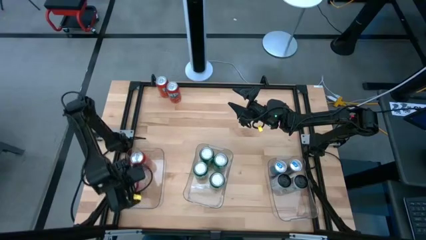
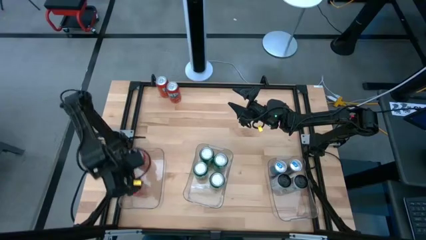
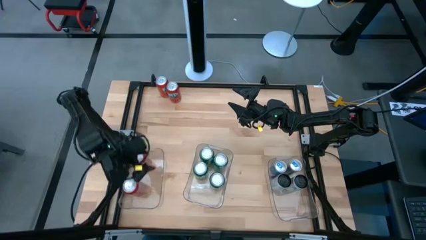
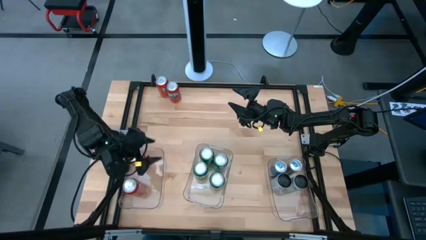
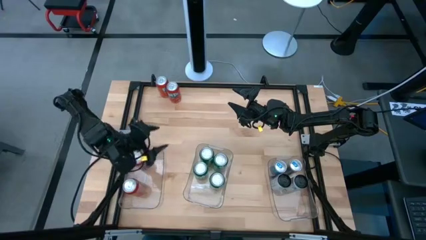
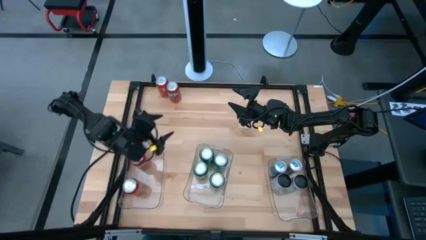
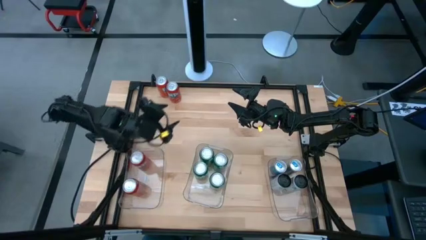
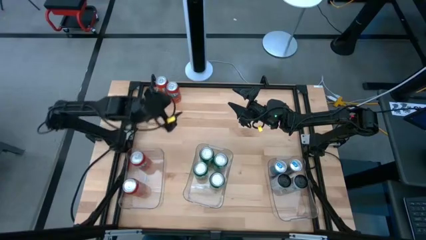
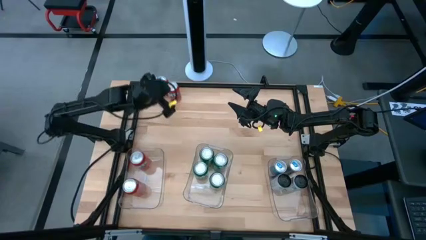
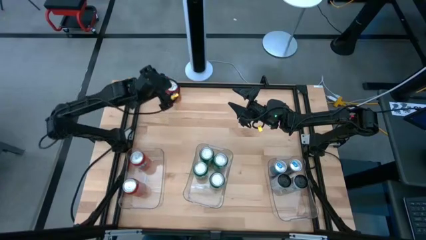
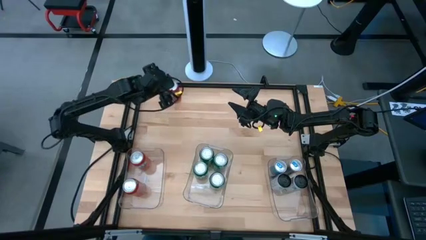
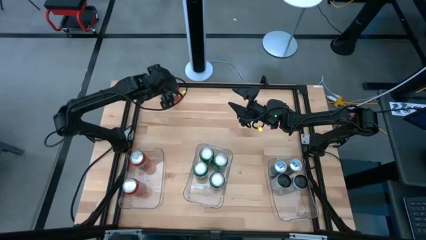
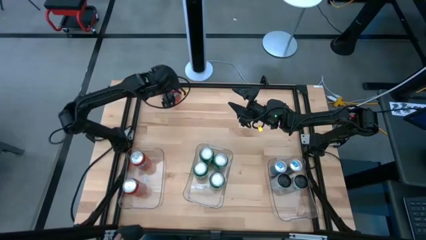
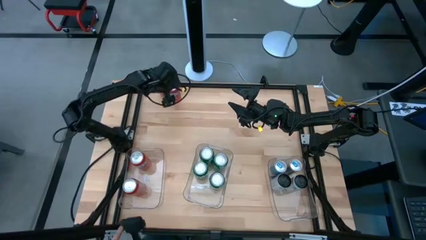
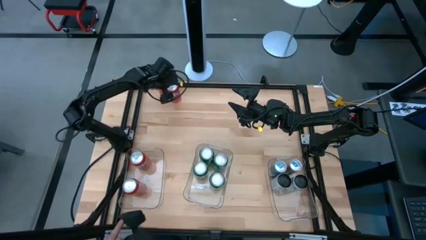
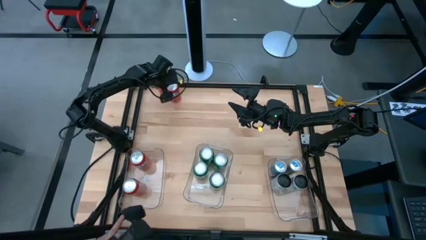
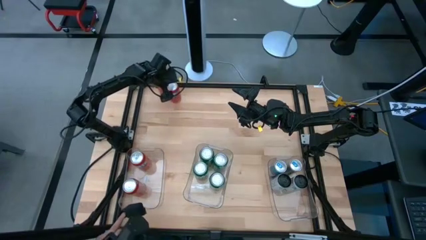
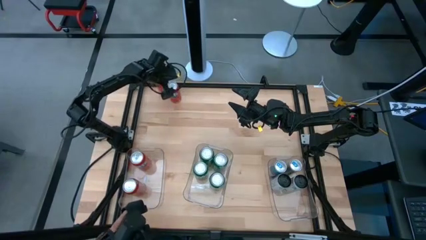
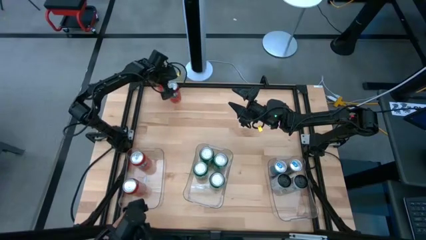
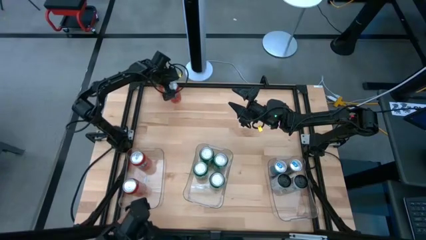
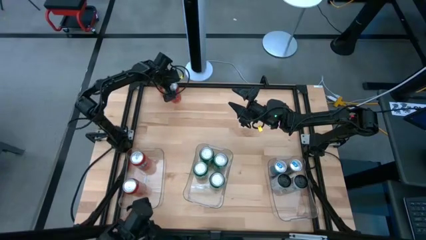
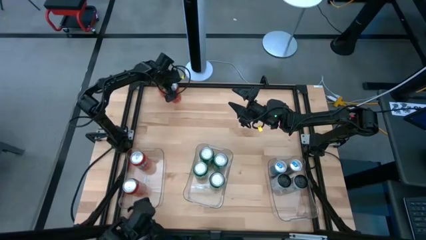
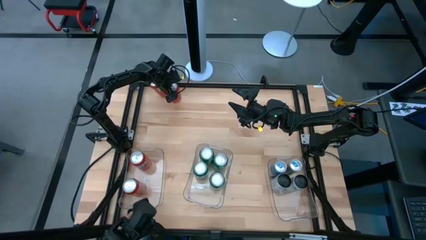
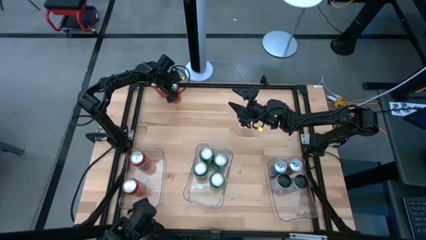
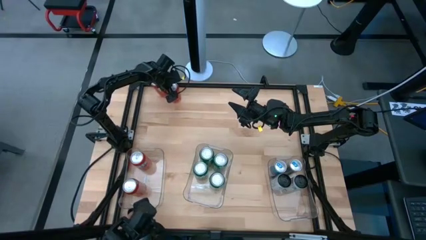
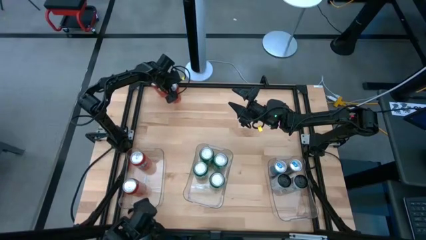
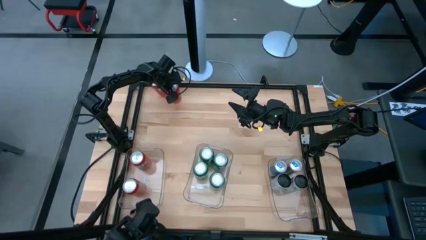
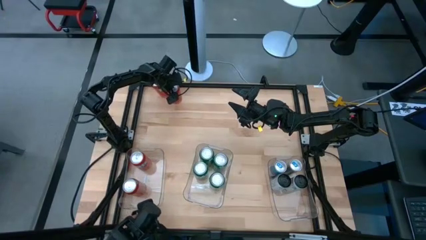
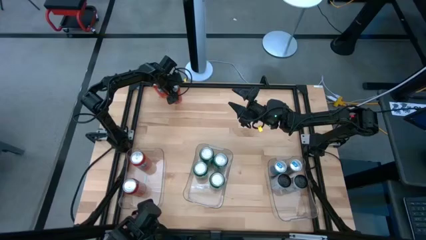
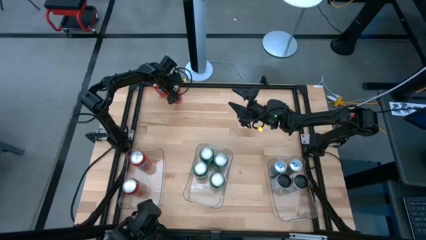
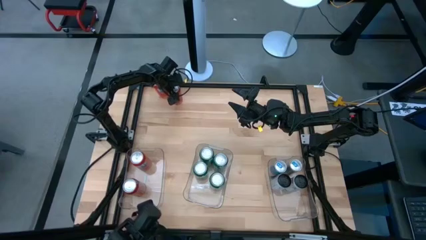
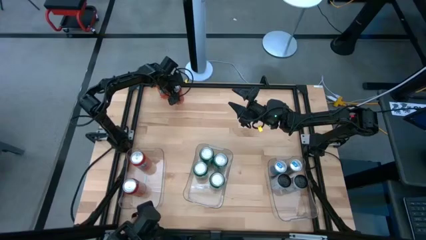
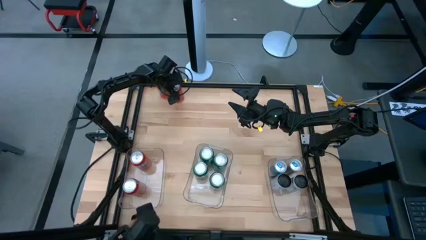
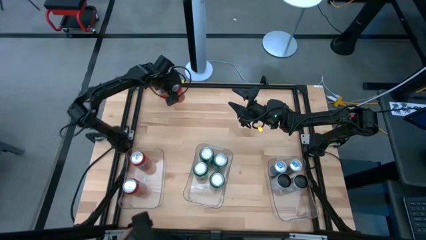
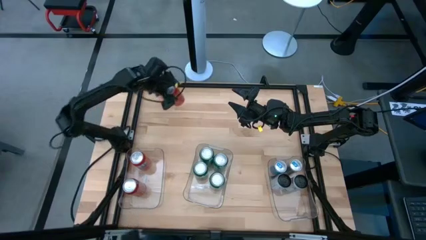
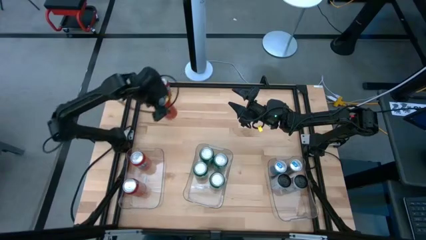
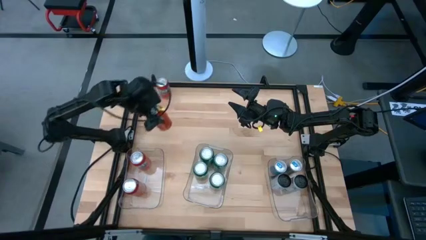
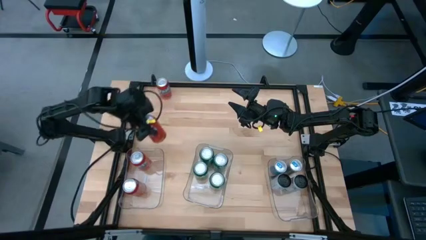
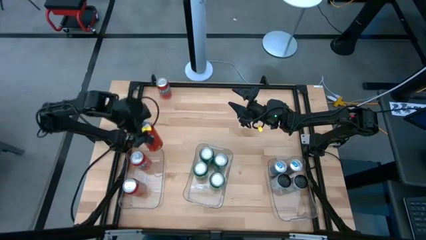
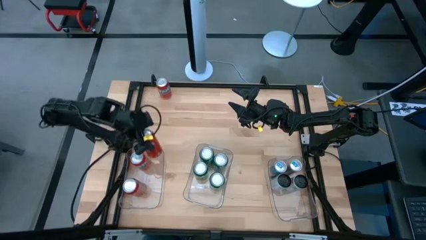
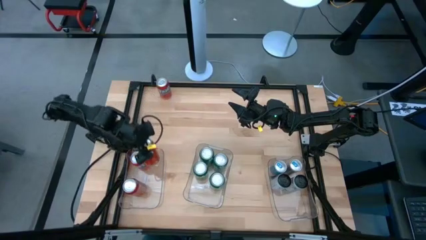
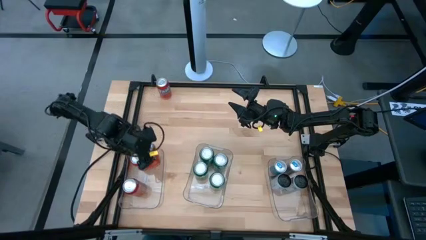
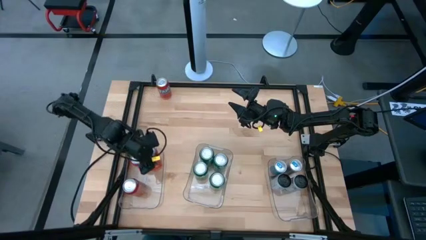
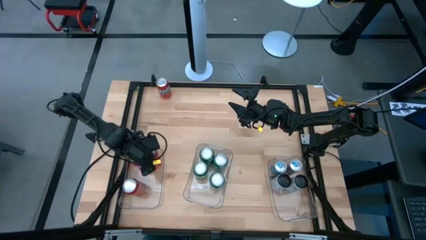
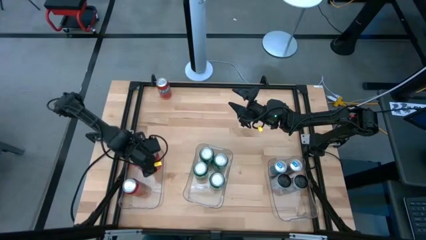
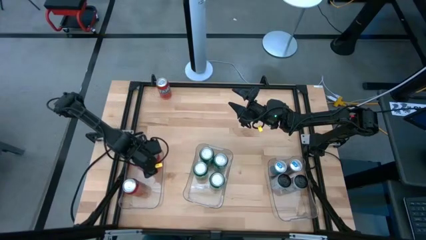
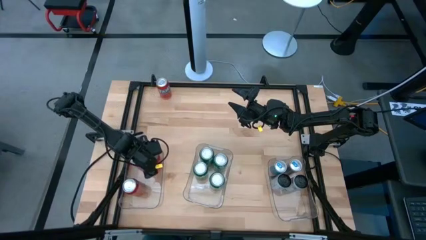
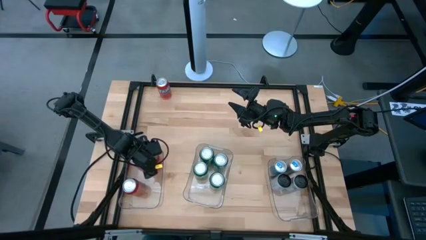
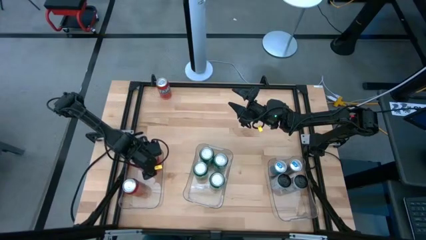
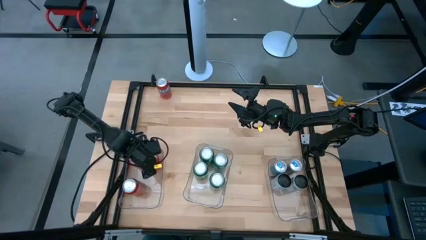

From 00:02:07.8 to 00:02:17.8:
Task: Sort soda cans
Put the orange soda can into the left transparent bin

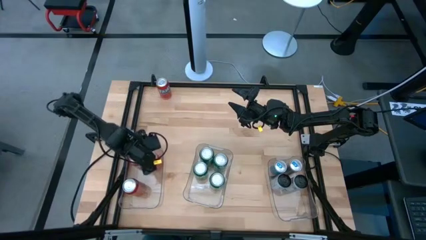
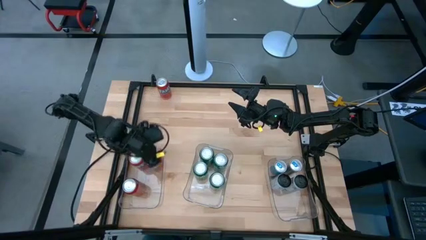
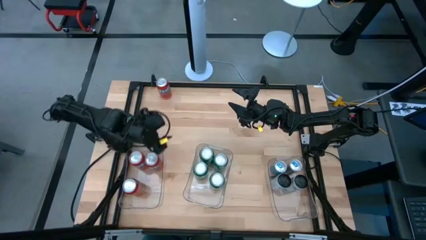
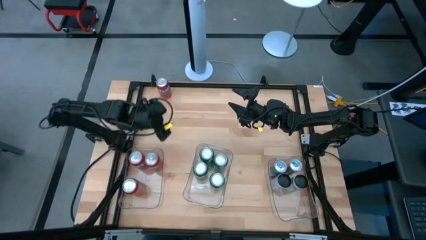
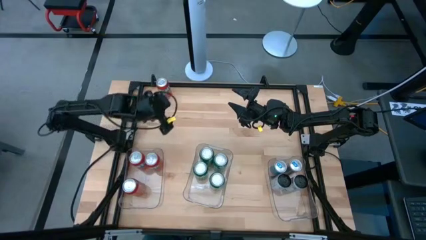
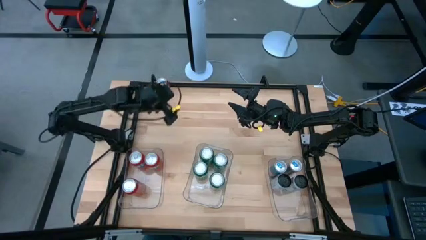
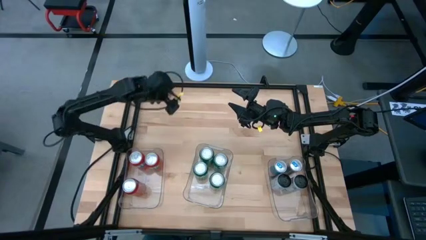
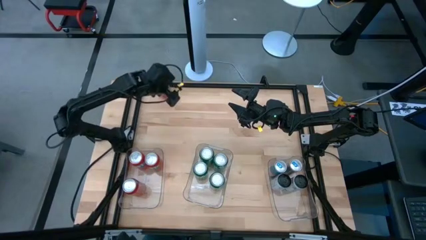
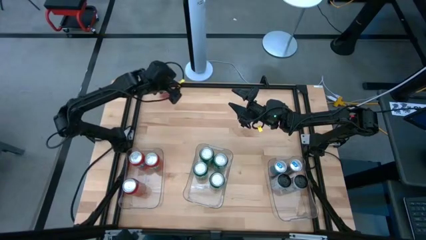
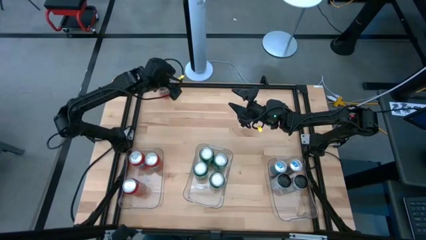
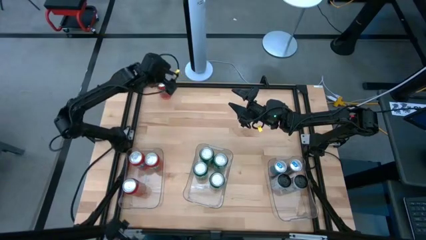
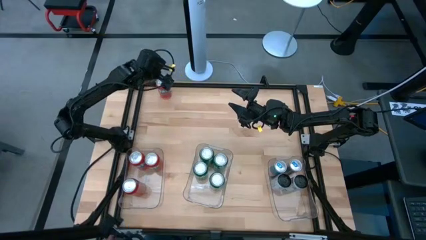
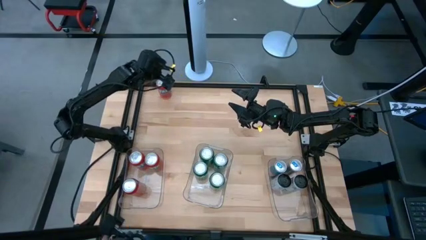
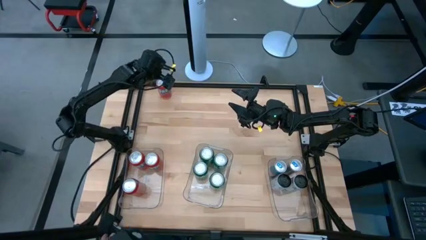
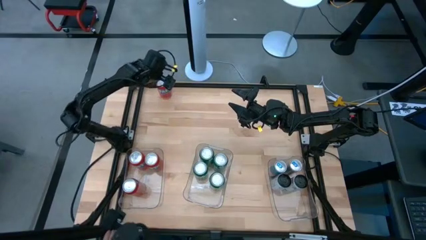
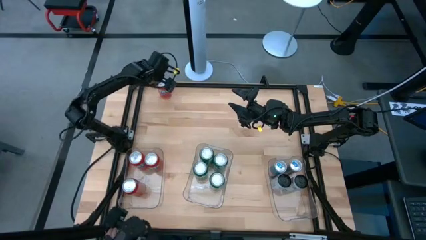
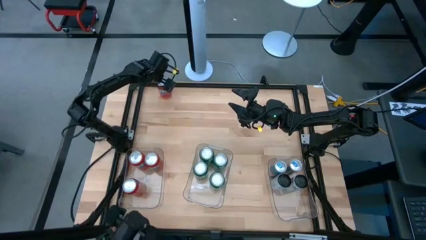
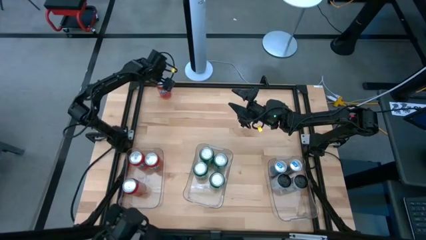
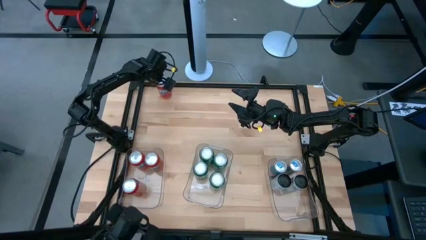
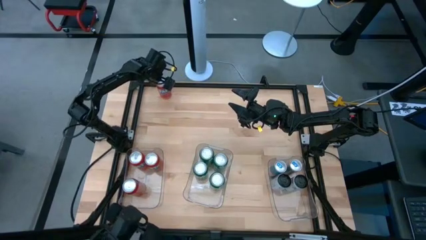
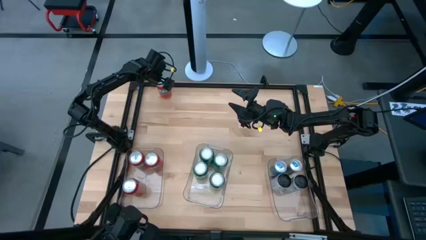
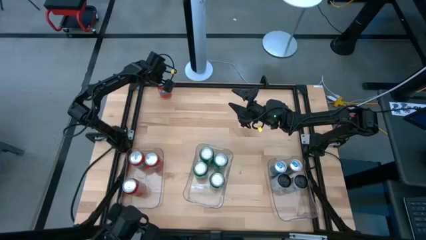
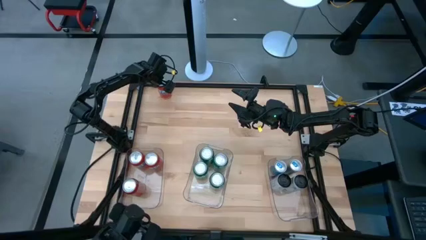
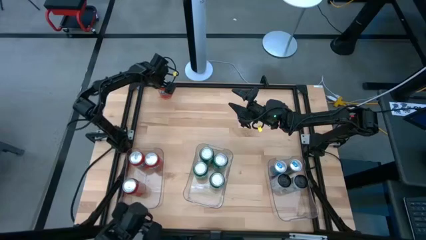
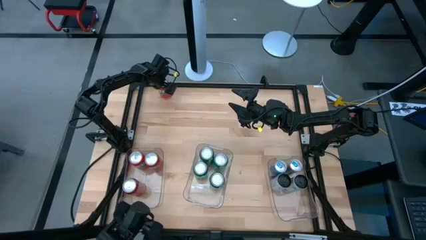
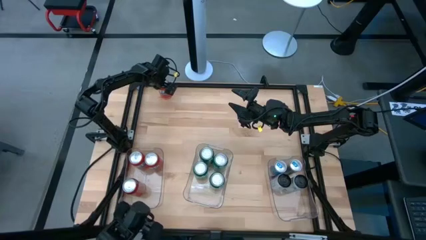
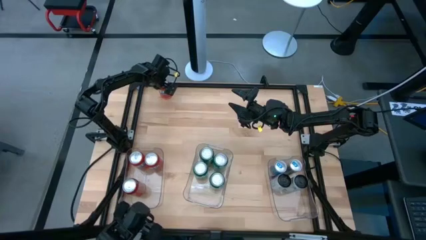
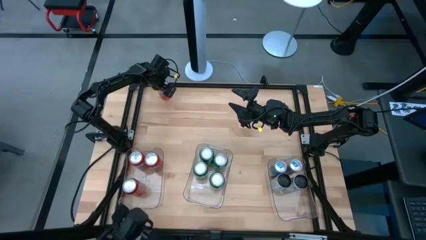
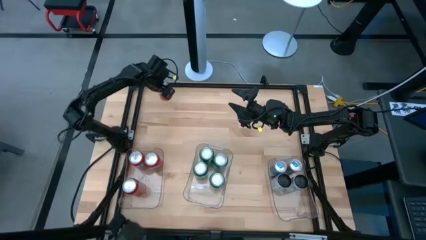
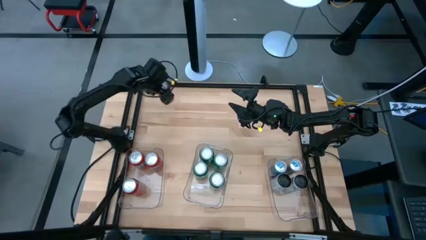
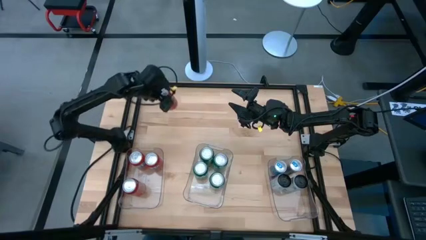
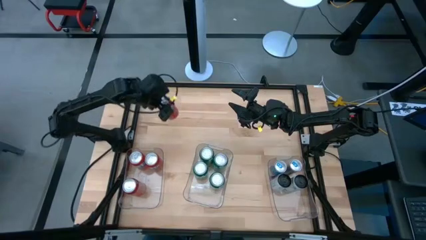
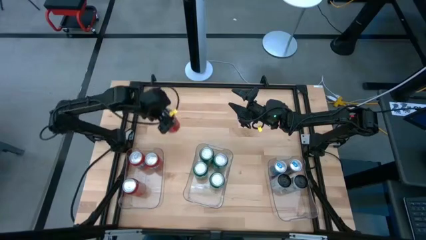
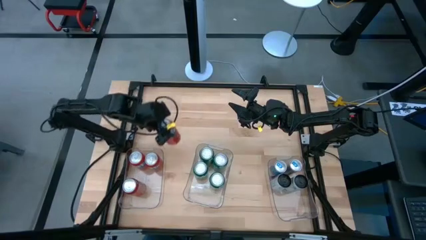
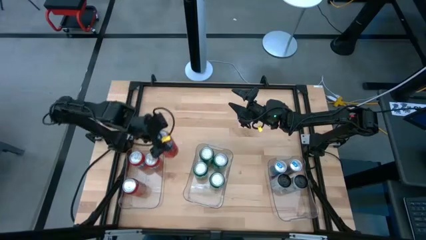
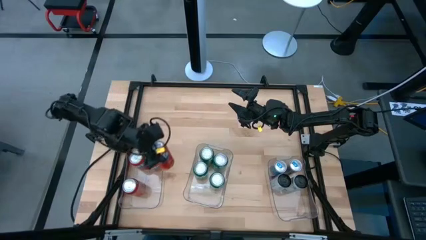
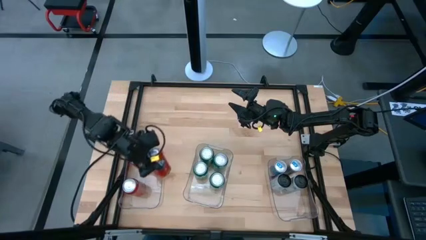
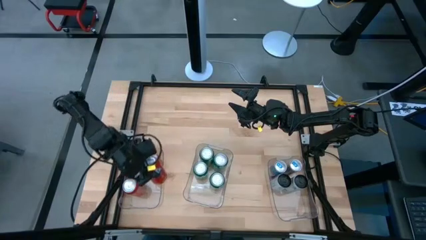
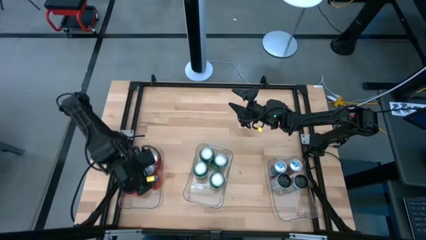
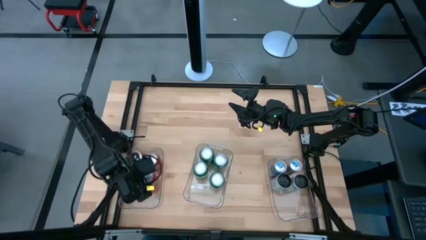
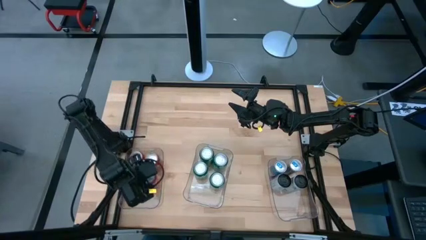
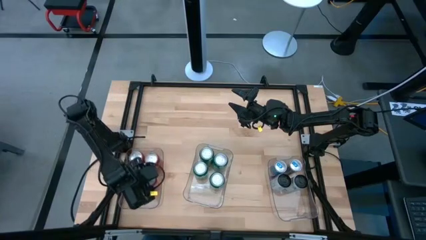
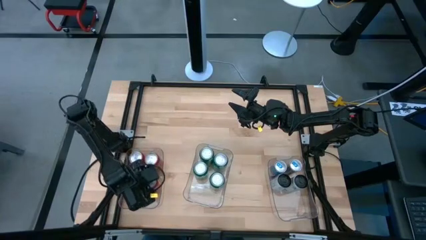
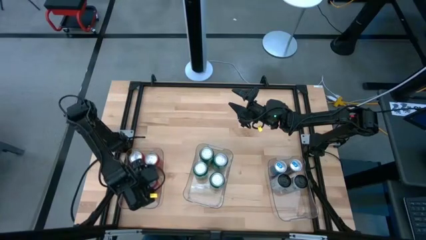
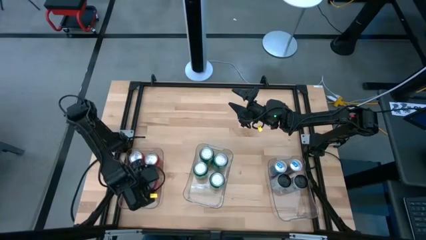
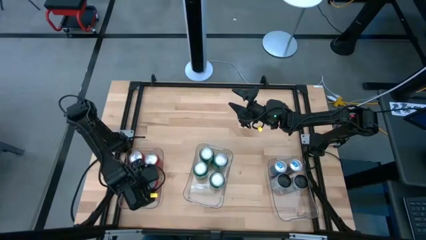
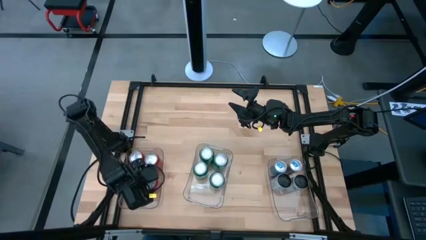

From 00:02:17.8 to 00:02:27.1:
Put the orange soda can into the left transparent bin
